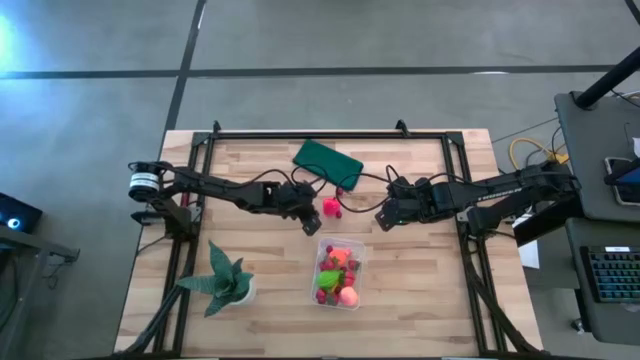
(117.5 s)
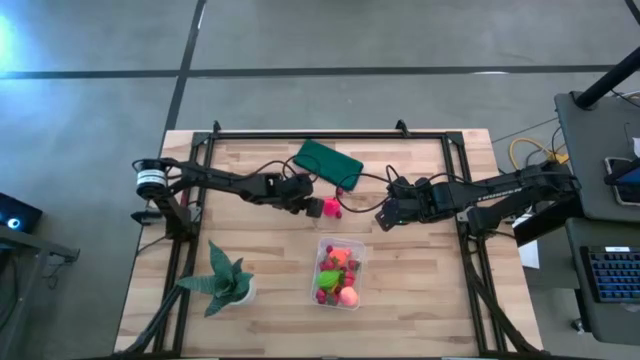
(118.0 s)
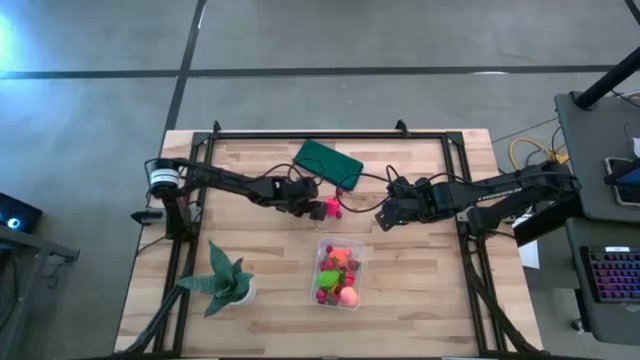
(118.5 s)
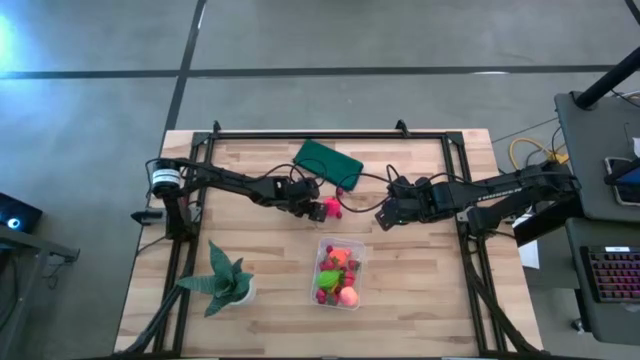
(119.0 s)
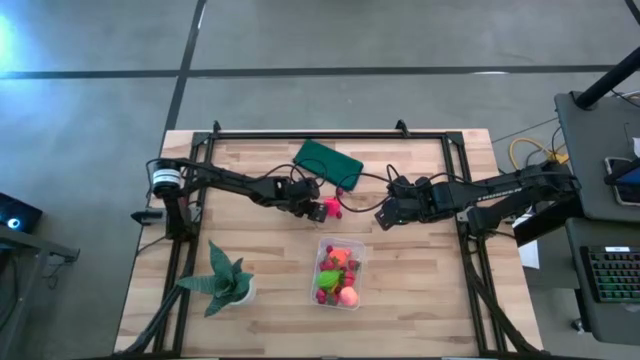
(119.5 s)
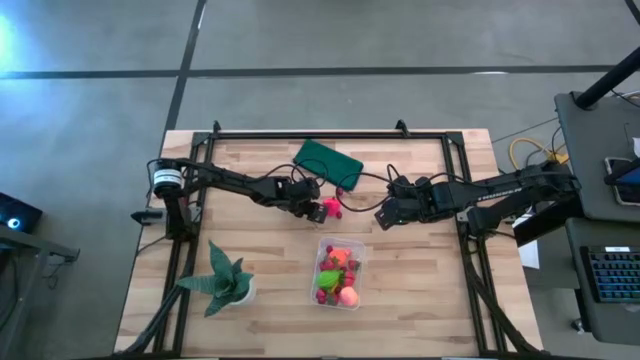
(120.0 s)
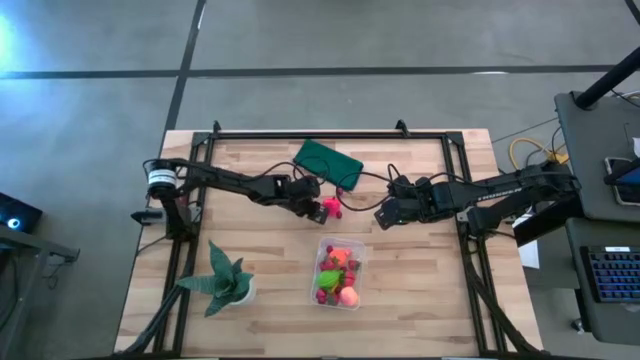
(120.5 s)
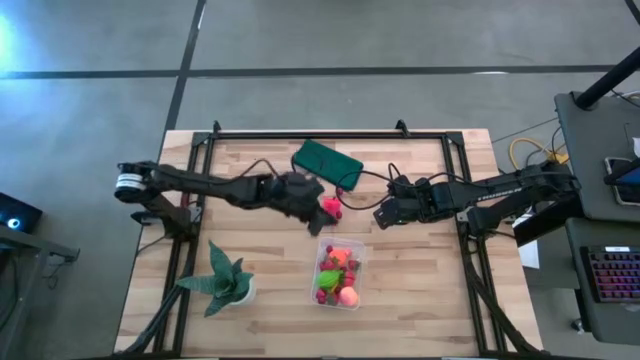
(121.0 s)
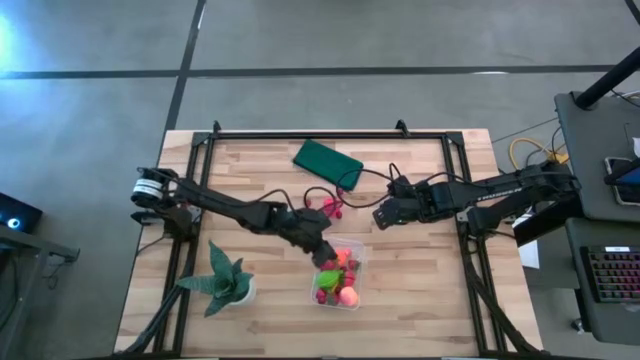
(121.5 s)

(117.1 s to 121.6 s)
Task: Pick and placing Produce into tupperware
Put the red cherry into the transparent bin

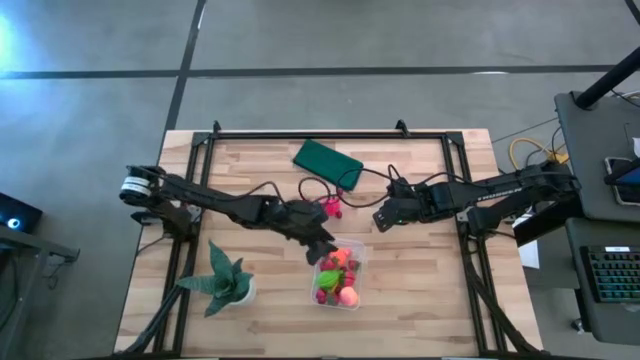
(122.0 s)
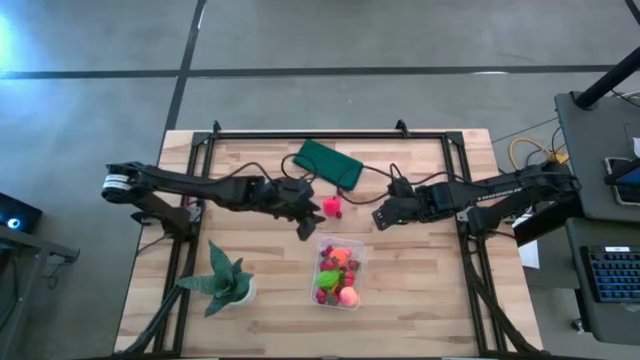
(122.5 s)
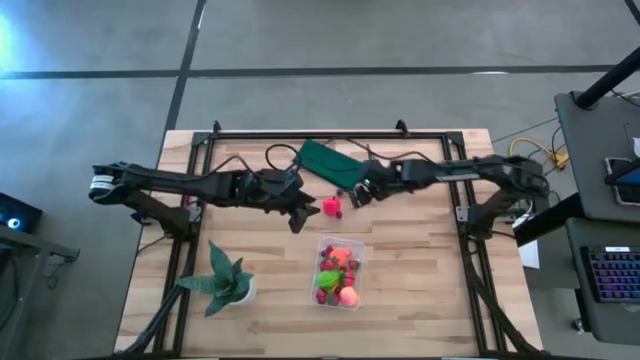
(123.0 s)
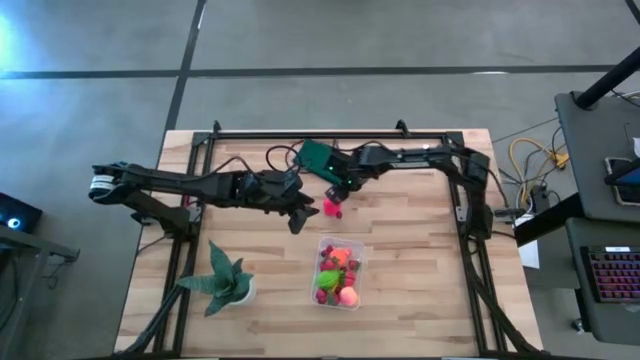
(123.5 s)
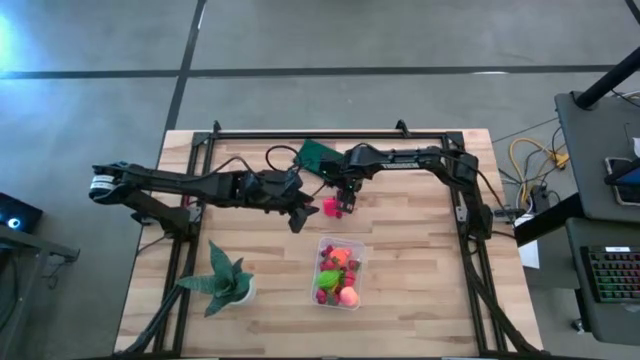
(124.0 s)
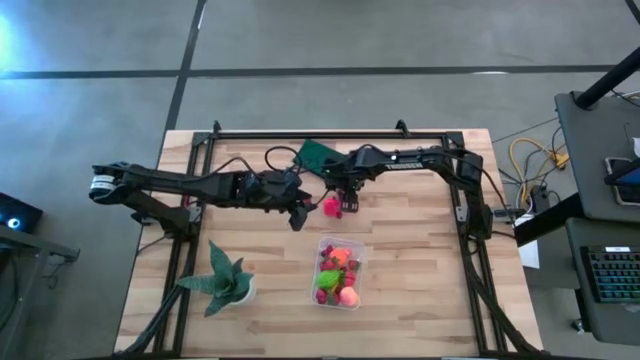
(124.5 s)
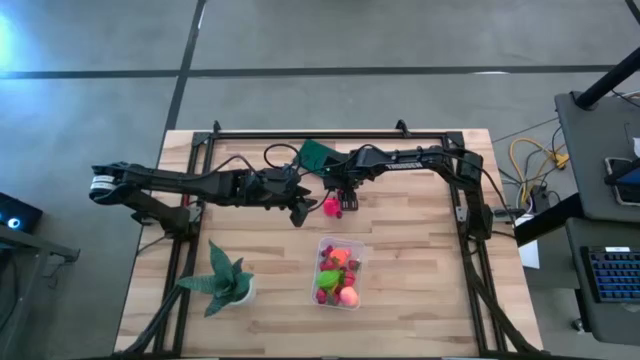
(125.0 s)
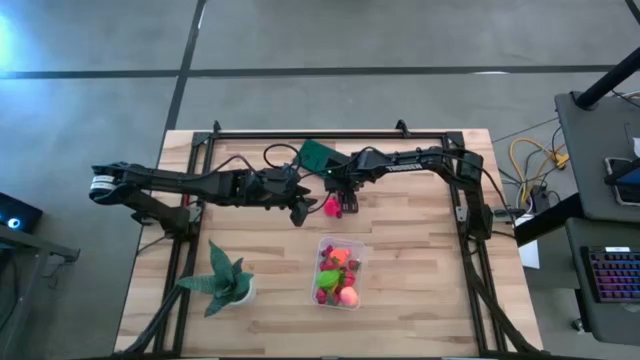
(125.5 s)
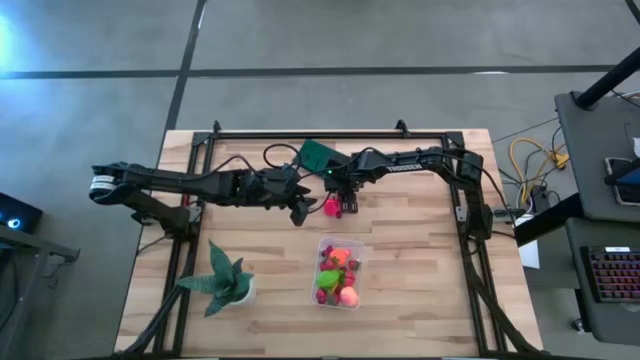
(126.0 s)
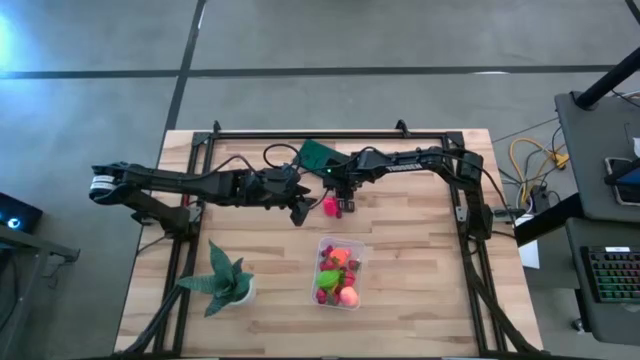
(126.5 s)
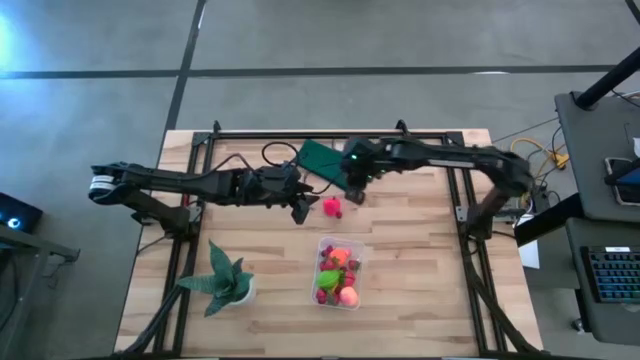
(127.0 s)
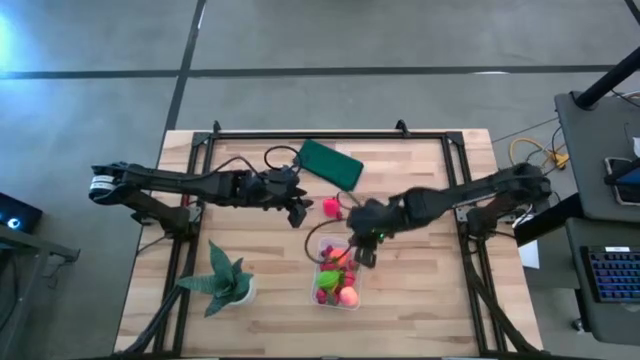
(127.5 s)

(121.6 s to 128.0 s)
Put the red cherry into the transparent bin

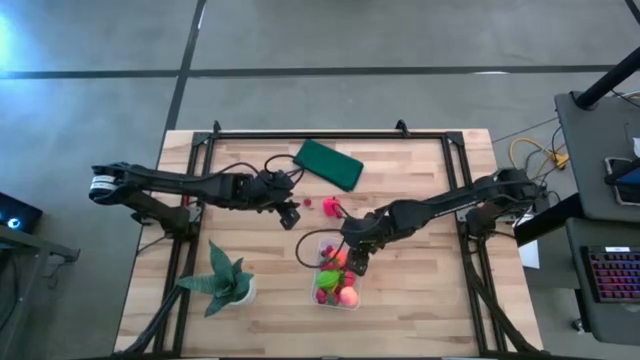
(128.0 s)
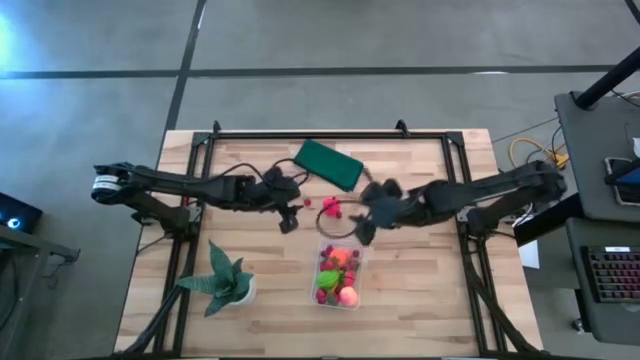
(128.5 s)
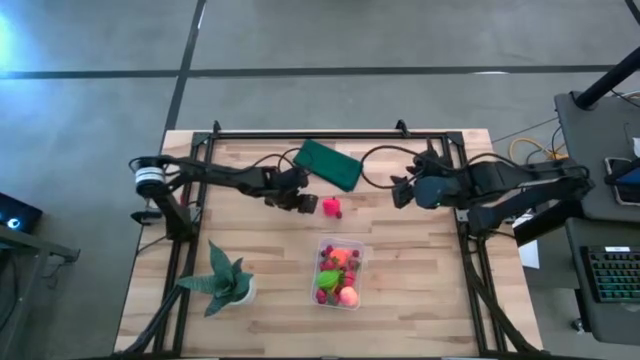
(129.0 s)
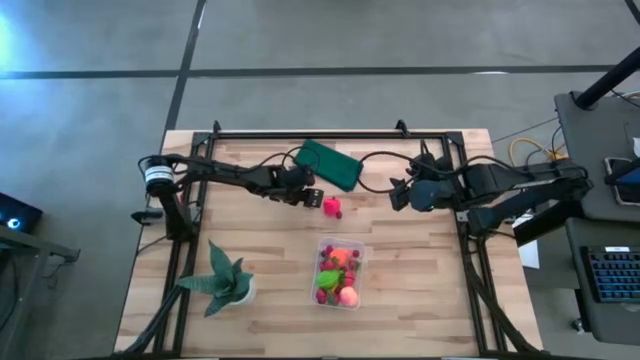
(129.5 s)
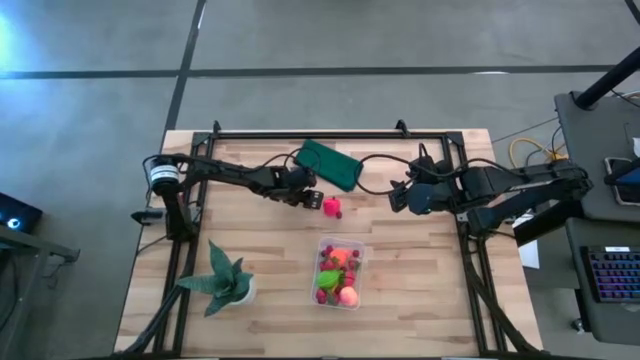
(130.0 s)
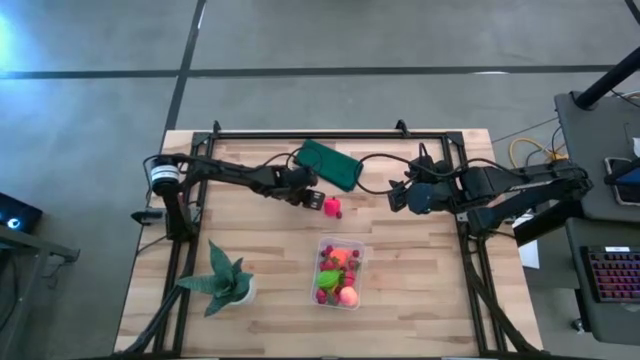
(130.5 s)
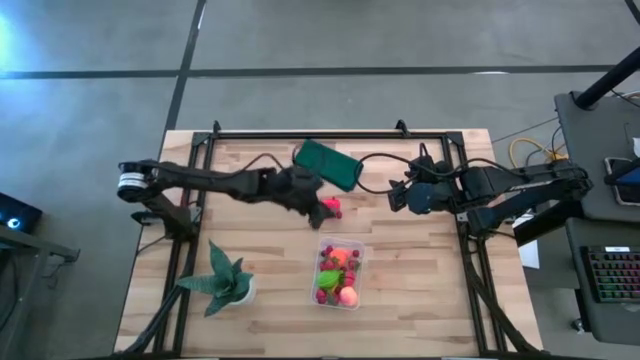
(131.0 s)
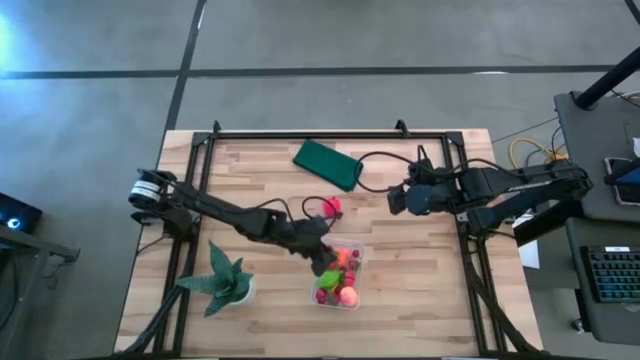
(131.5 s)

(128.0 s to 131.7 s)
Put the red strawberry into the transparent bin

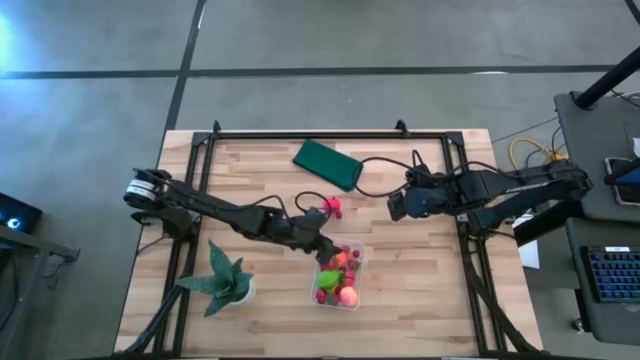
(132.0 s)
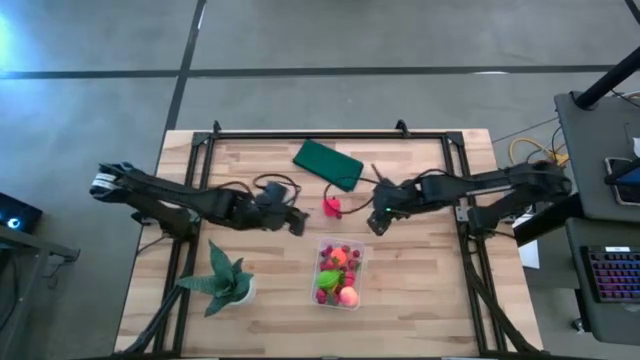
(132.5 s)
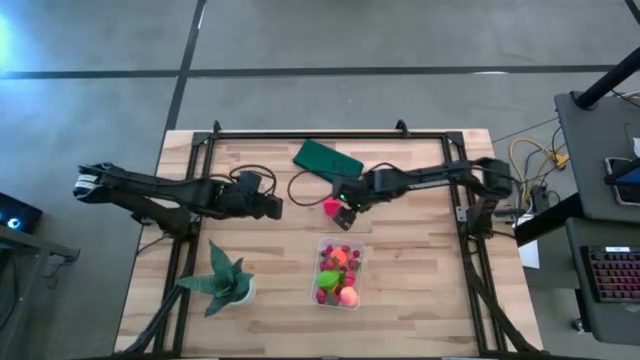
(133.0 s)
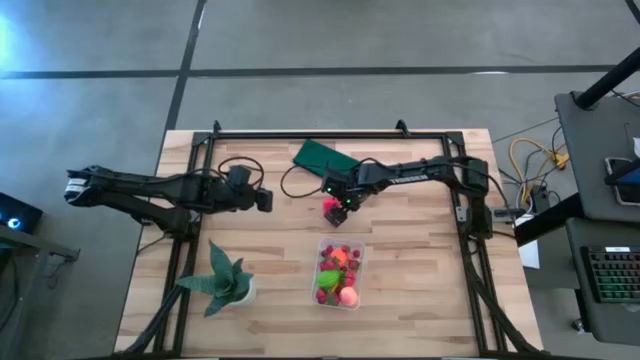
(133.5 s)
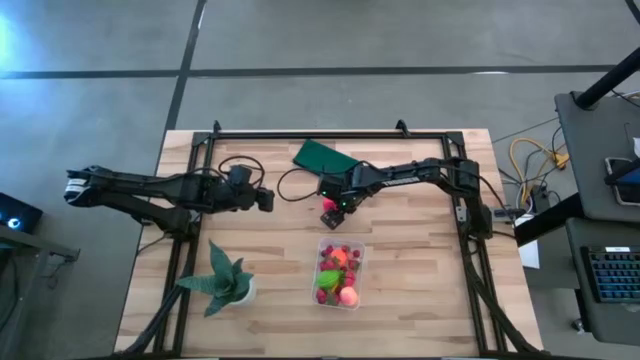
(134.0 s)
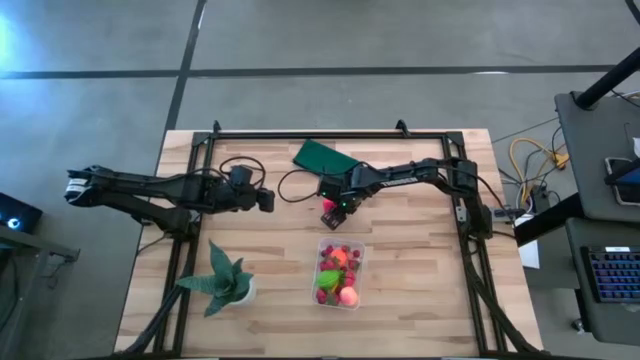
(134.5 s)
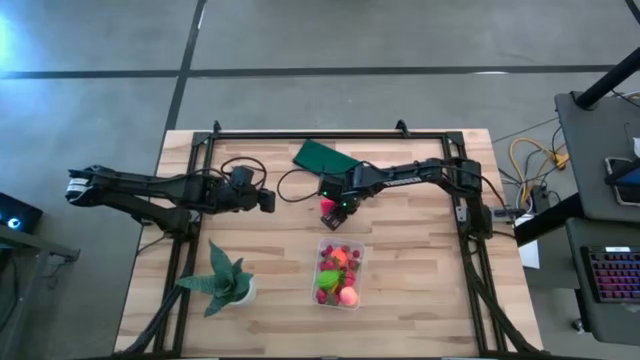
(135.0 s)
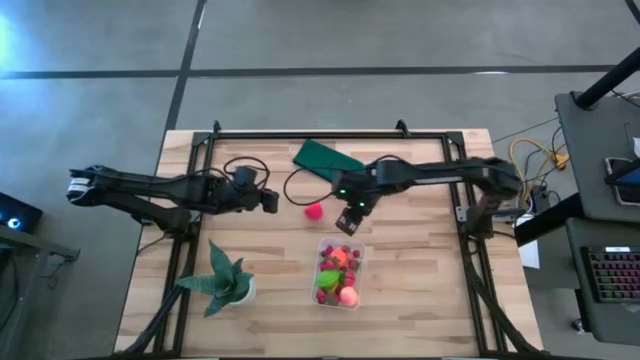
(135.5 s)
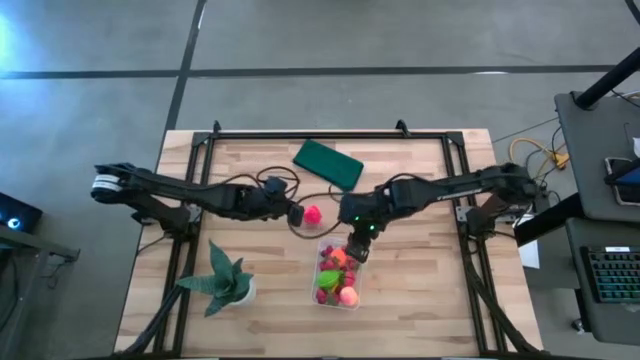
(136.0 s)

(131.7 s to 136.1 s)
Put the red cherry into the transparent bin

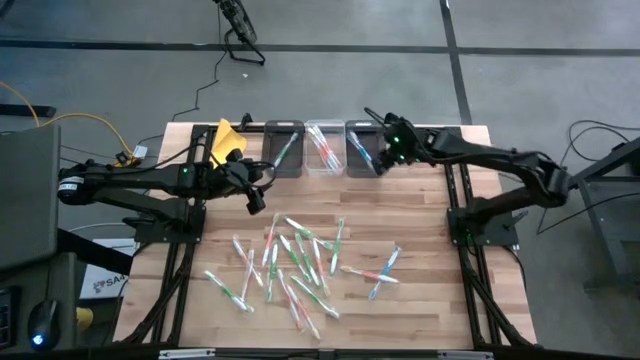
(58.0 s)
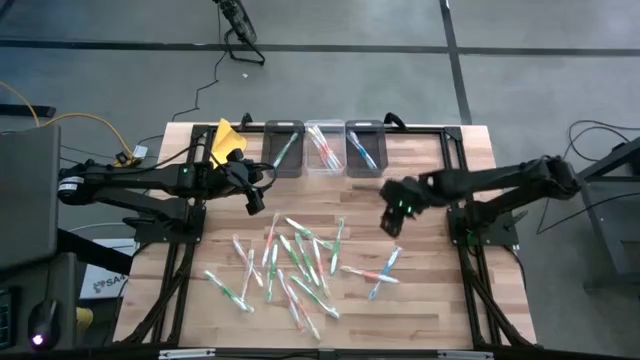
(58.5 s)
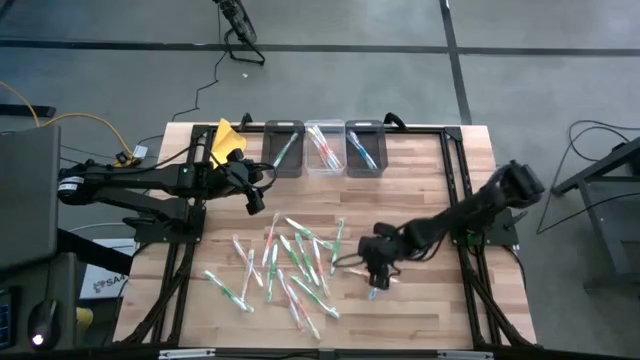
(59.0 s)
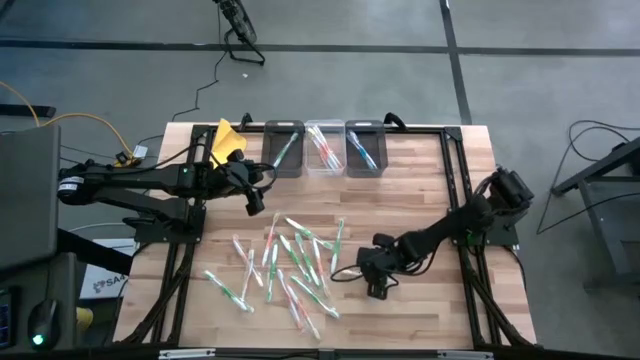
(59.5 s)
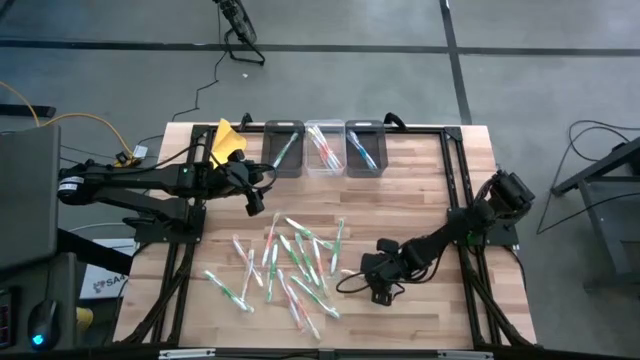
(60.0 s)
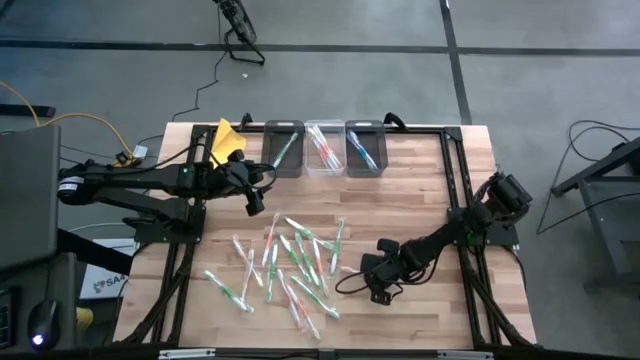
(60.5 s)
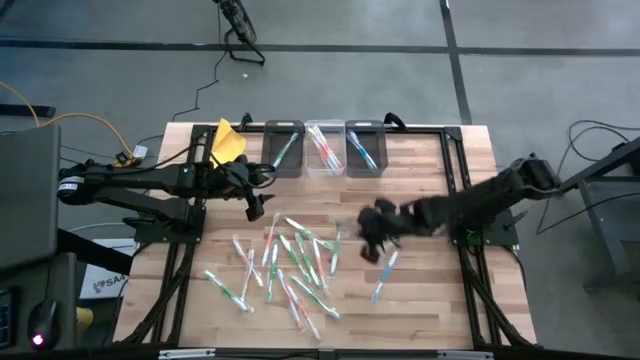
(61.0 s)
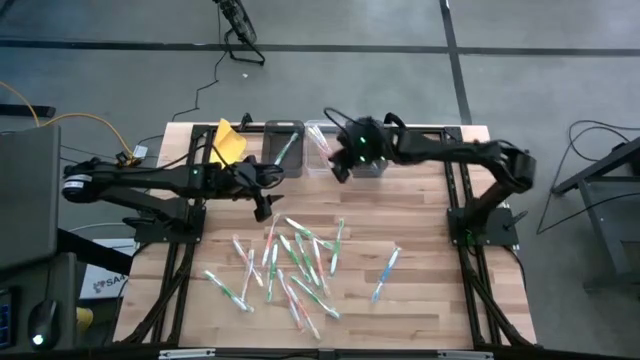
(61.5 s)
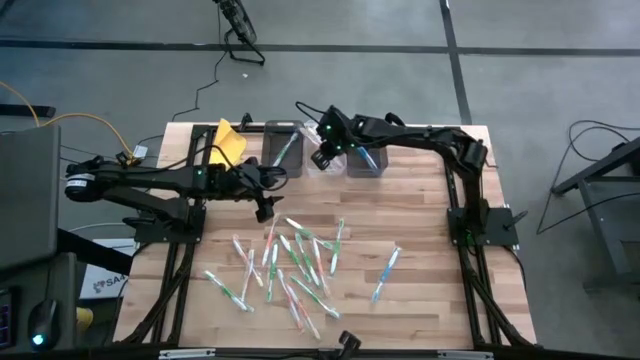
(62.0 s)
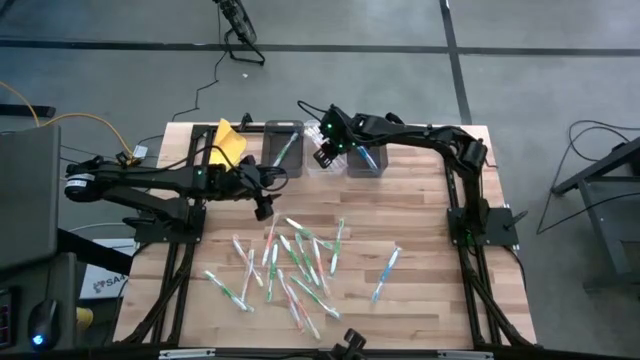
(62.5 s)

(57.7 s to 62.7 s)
Task: Pick & Place Toothbrushes
Put the orange toothbrush into the transparent bin
